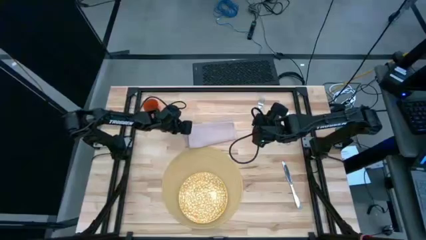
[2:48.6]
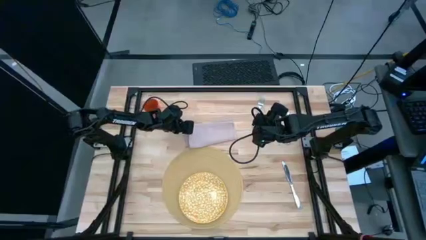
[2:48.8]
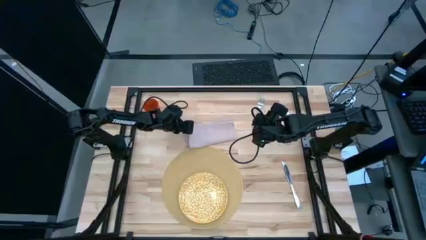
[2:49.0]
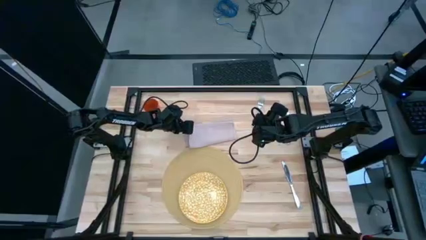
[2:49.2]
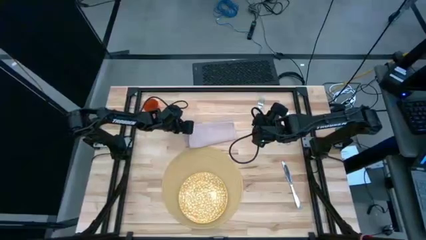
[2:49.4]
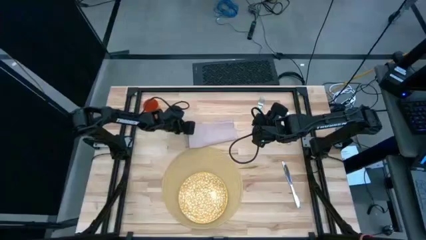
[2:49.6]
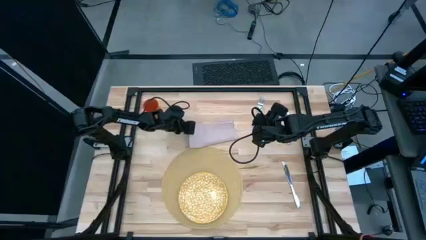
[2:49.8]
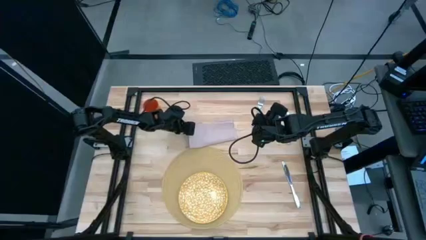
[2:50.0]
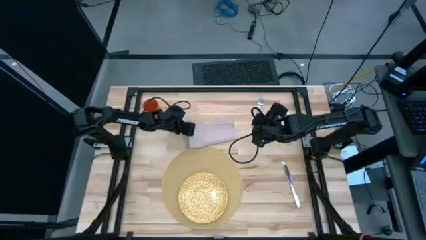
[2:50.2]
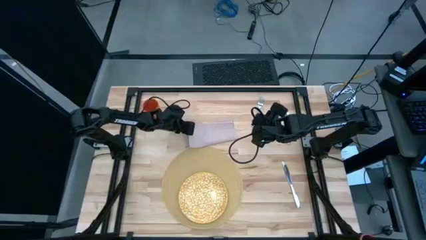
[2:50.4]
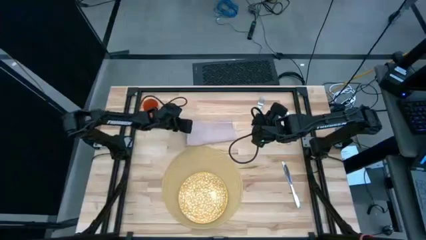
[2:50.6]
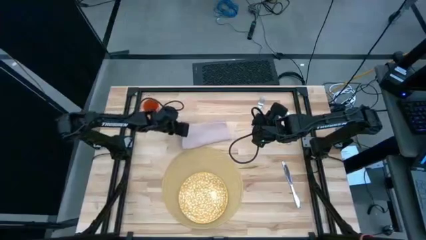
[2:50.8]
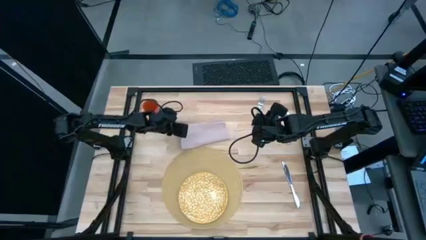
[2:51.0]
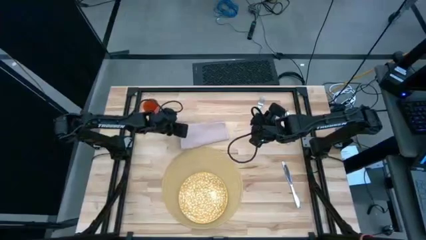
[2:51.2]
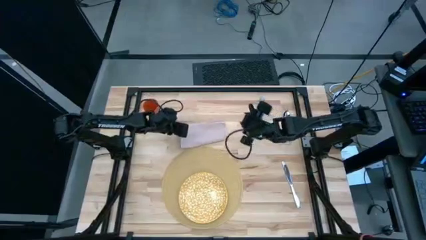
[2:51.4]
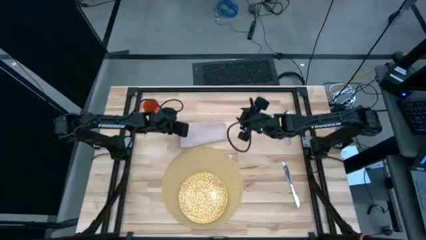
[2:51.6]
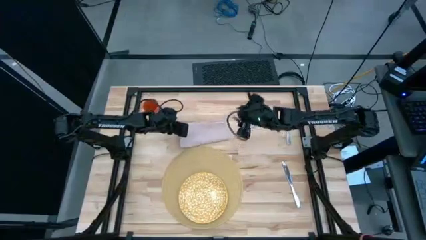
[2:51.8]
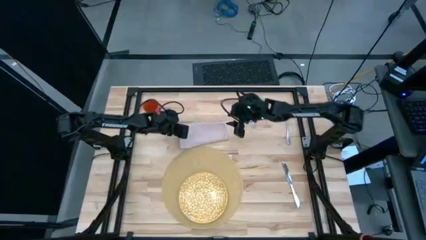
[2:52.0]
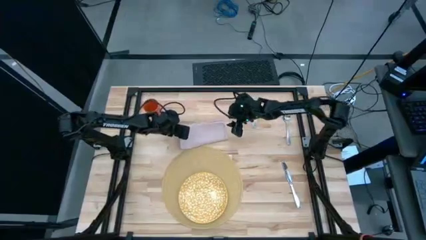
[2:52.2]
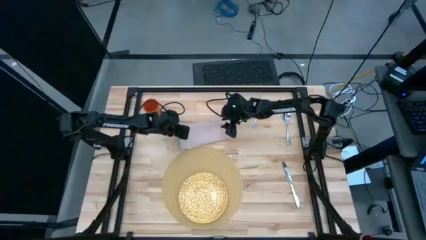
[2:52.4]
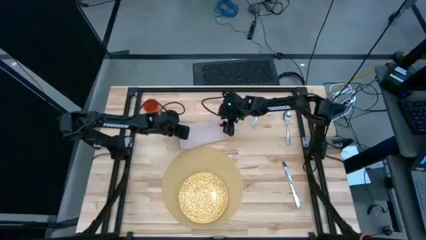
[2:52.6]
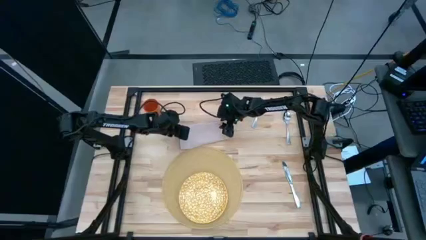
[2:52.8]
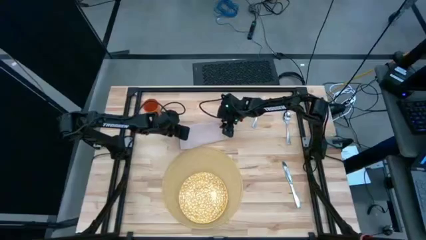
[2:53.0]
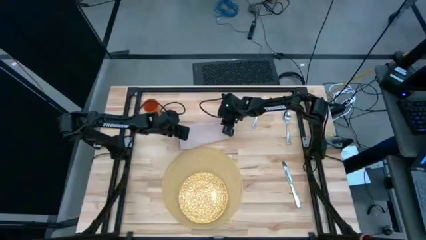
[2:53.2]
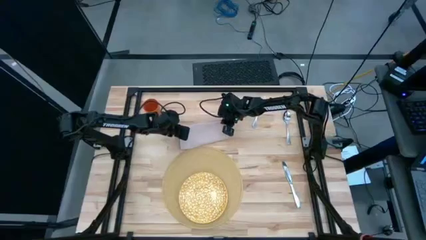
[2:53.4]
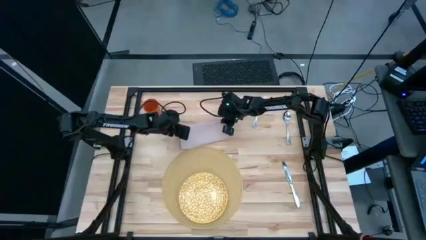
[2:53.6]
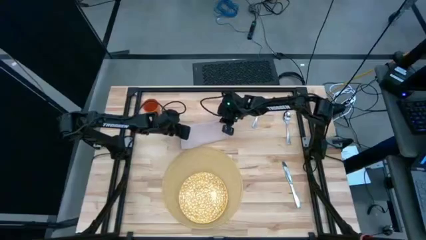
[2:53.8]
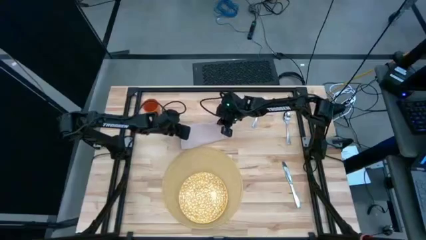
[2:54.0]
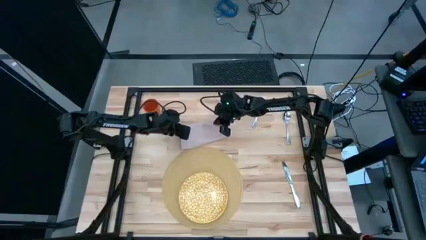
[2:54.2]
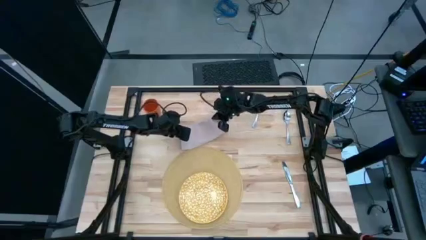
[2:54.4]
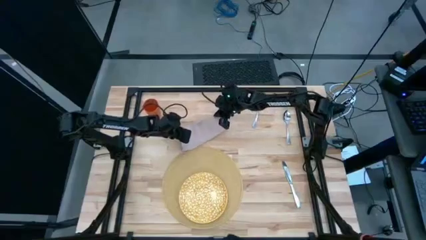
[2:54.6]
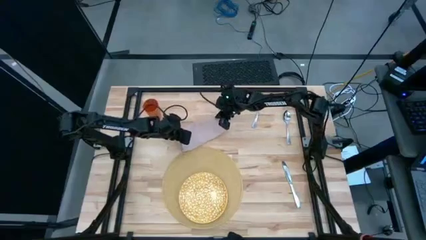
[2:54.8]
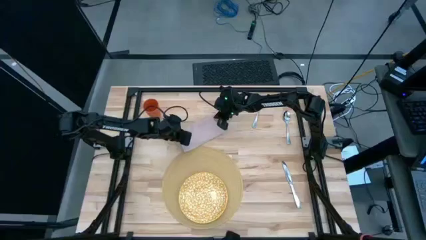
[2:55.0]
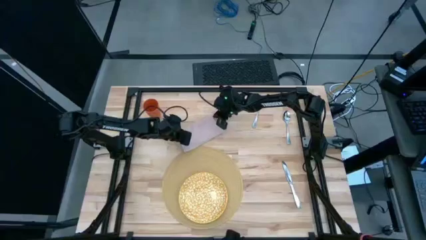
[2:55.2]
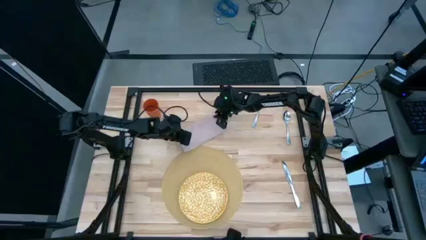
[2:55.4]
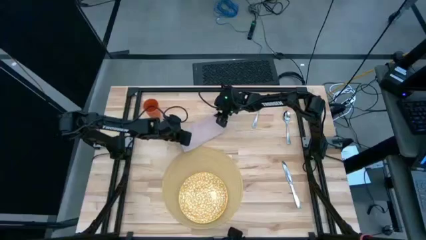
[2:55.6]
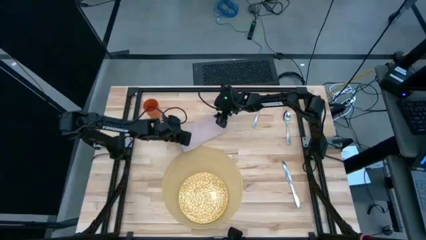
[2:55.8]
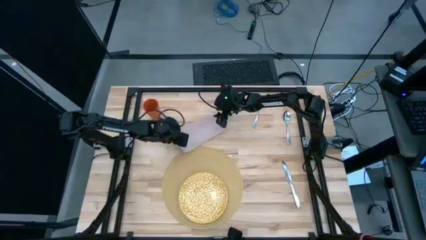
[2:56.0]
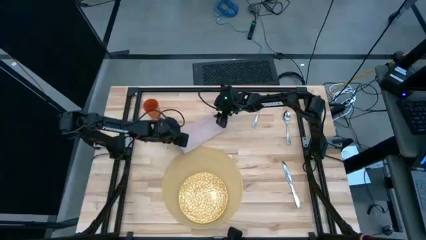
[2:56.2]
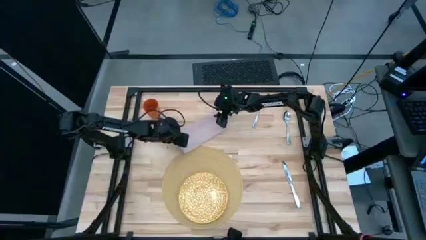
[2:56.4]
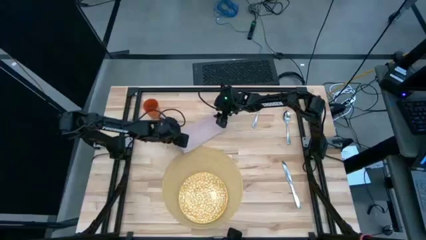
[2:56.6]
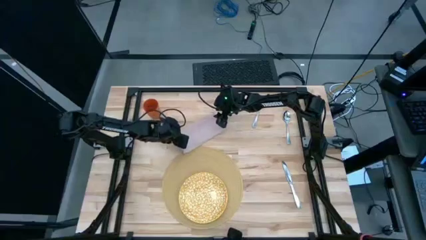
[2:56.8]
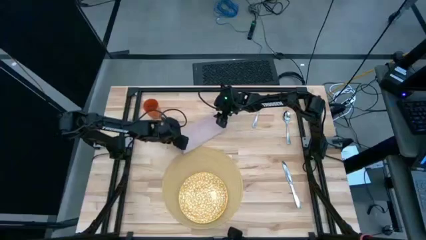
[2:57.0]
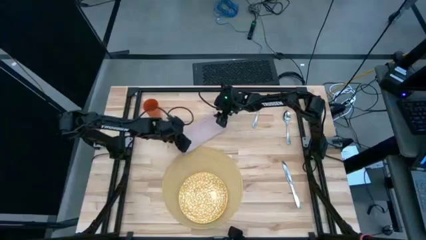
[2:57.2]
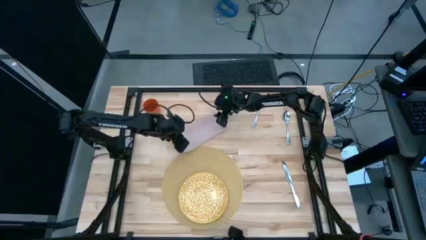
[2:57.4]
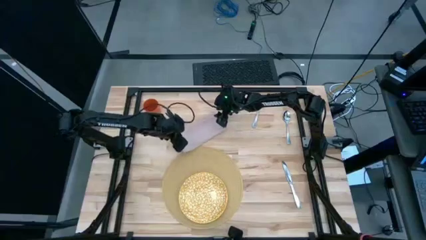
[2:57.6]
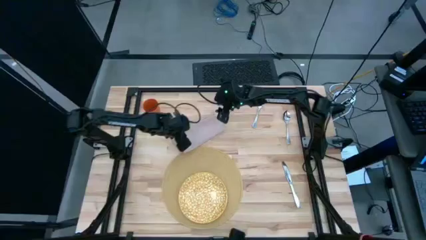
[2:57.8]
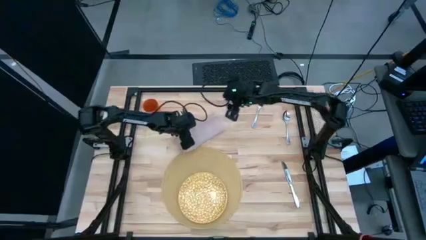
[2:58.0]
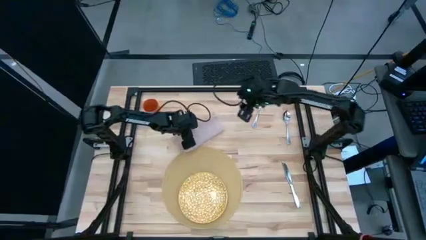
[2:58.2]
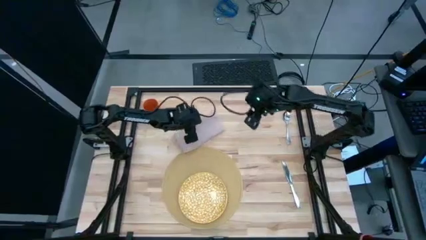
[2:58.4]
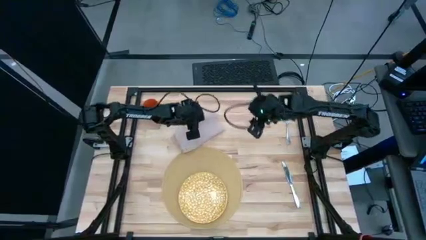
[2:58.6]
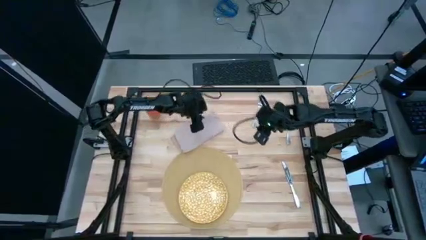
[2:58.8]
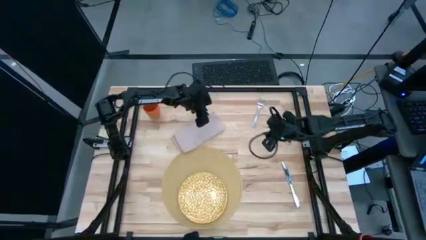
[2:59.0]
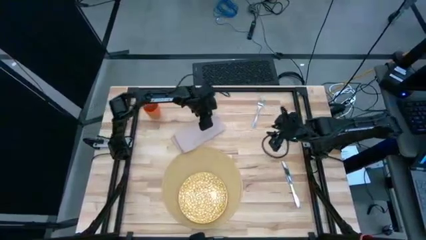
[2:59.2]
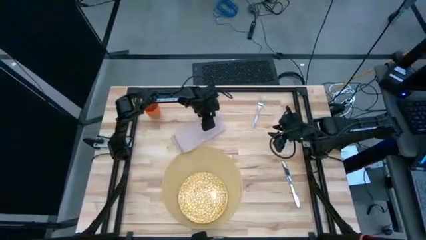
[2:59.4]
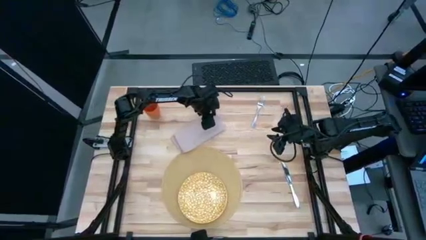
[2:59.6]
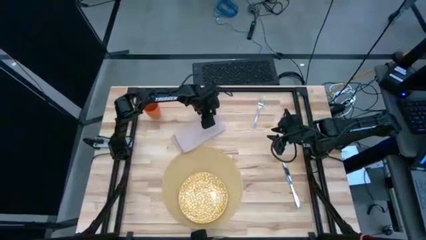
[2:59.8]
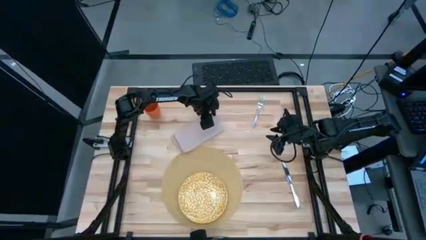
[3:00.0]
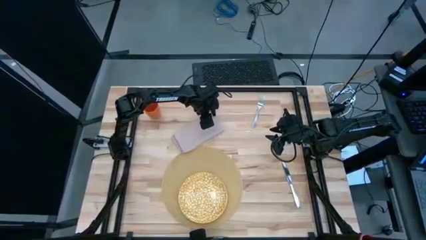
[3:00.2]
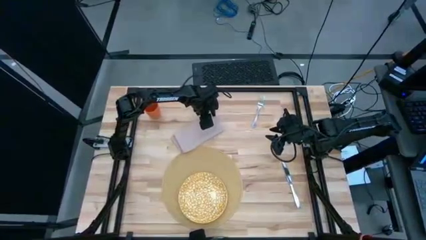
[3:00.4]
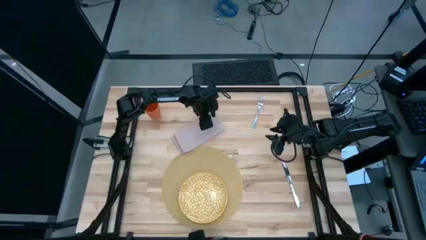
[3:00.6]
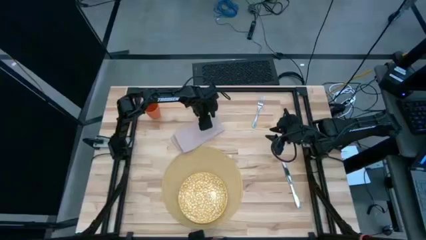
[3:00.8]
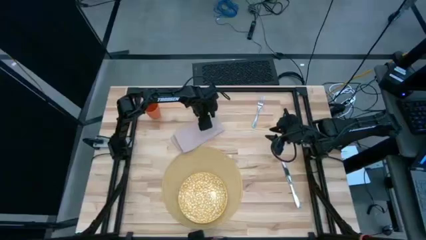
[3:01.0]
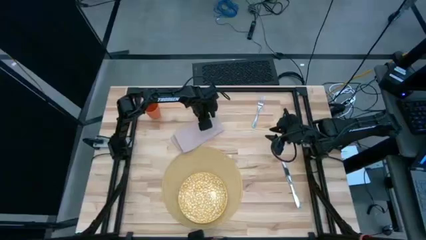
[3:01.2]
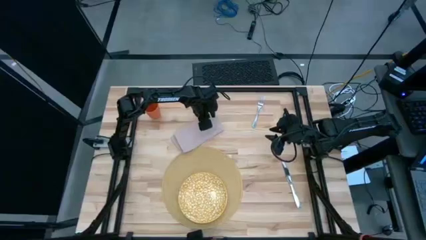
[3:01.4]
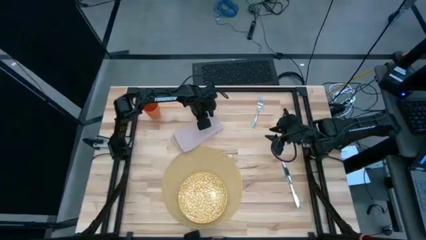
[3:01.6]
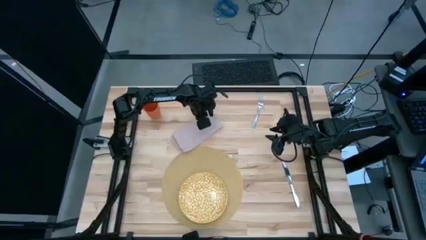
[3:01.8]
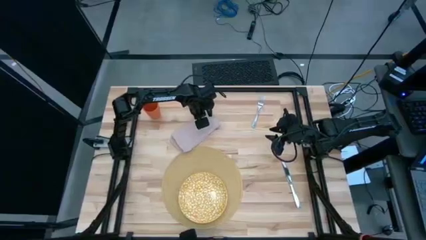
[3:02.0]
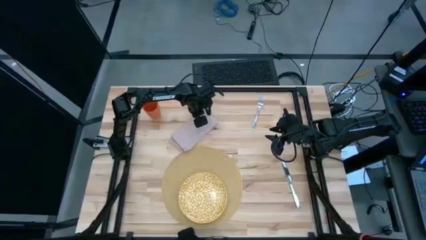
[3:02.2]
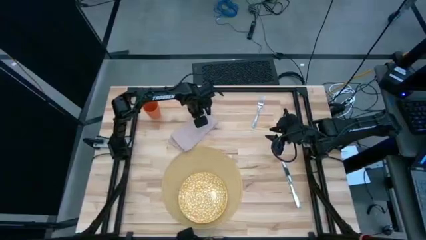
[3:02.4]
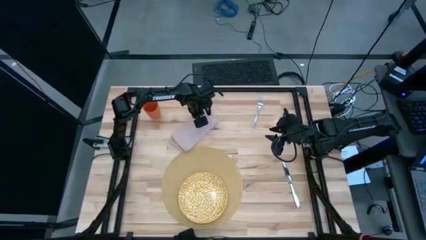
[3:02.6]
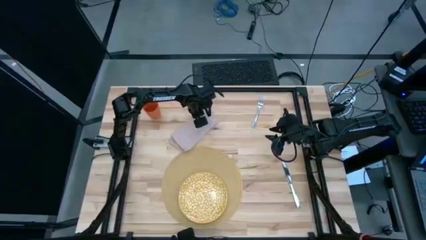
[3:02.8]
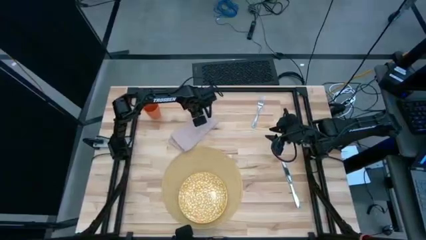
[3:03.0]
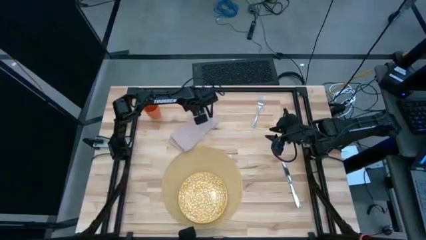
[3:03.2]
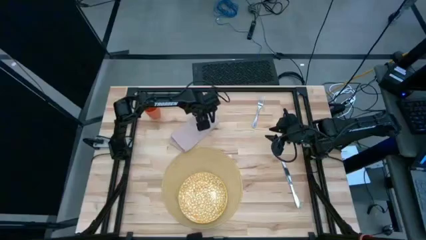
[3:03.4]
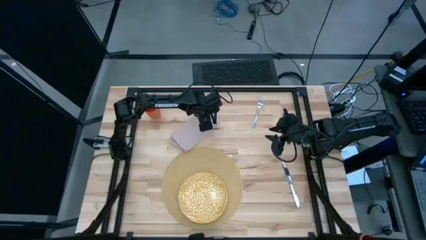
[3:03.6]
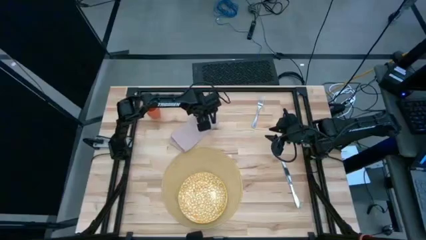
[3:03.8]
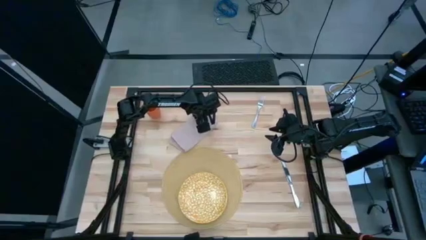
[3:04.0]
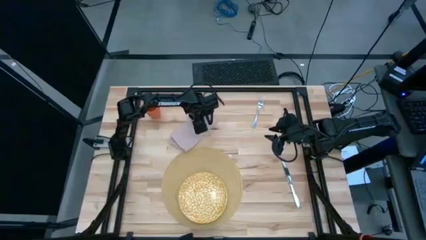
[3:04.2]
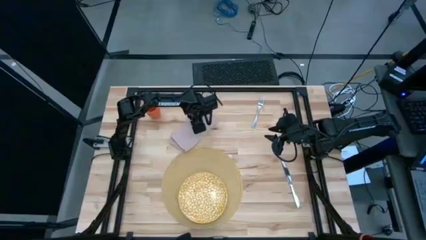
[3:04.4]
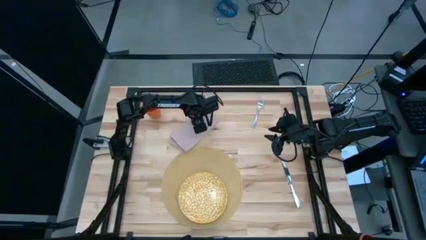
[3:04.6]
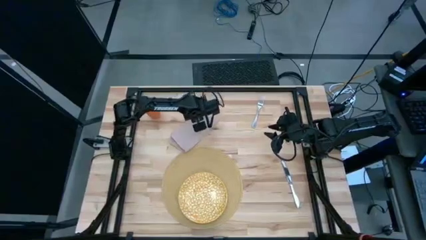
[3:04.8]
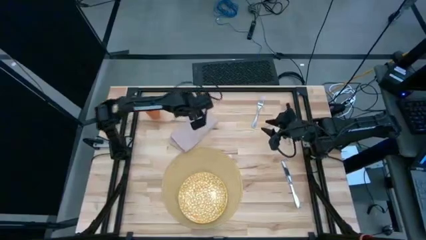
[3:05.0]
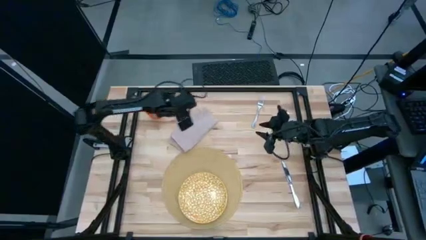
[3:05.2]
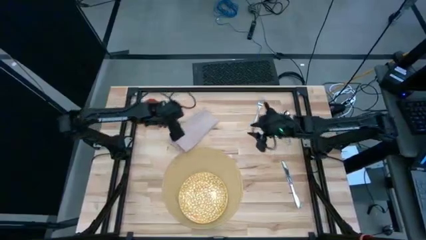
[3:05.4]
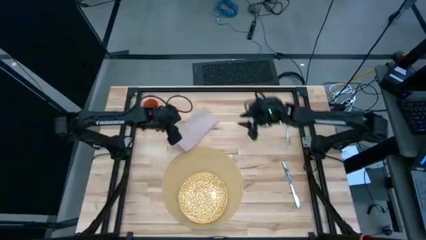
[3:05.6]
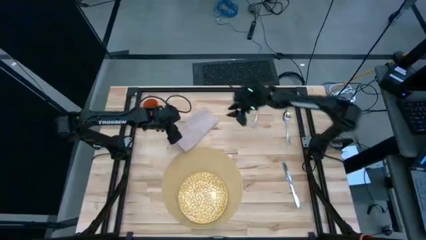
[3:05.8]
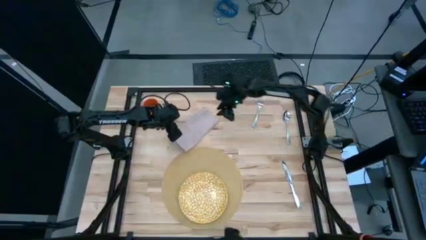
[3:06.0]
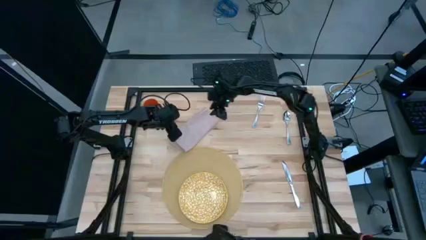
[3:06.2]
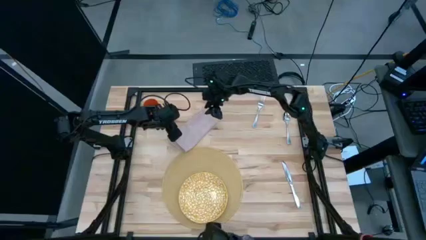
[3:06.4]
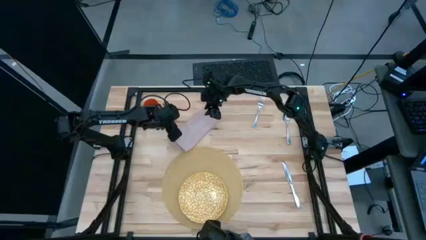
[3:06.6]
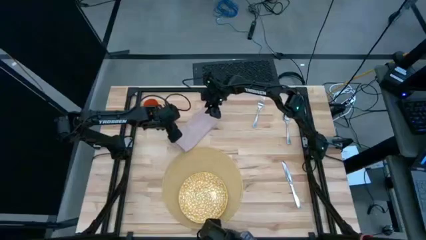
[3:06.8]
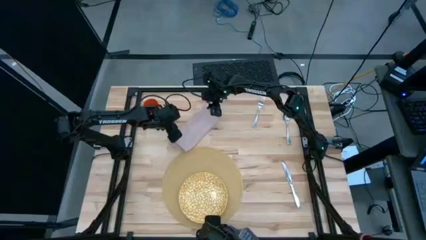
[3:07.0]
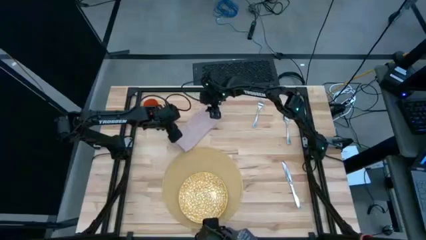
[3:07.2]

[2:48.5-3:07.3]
Task: Set table place
Fold the light orange napkin on the table
